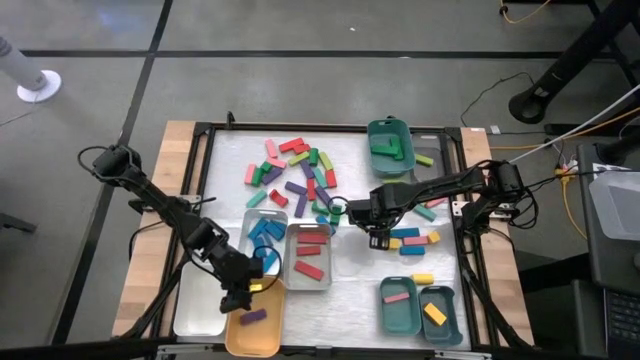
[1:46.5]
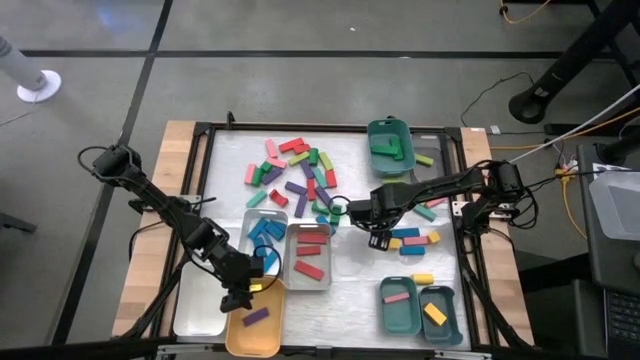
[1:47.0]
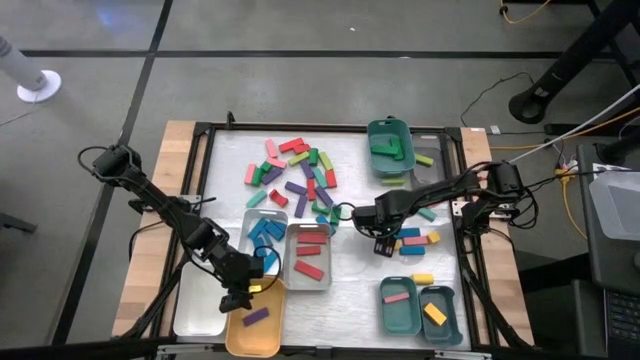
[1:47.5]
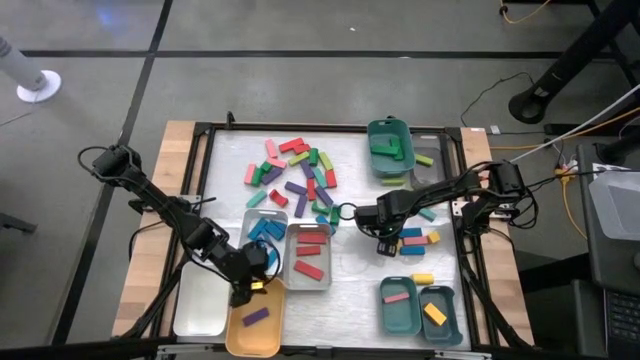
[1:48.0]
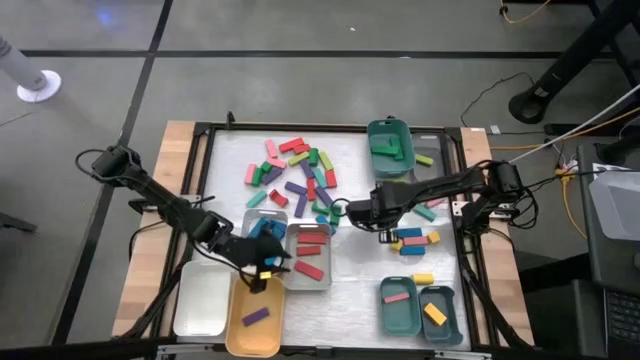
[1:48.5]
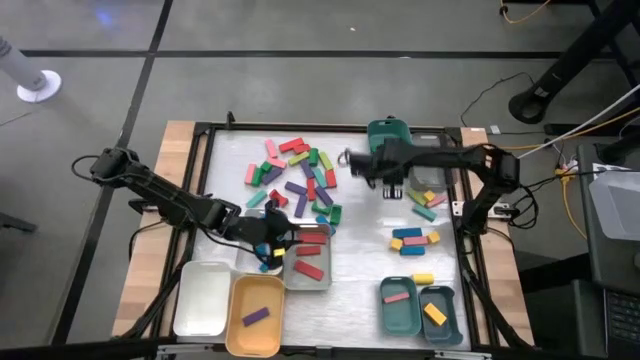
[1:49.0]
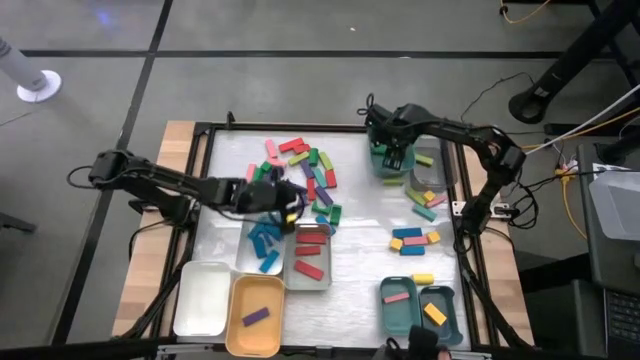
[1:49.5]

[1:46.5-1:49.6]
Task: Sort blocks
Put the green block into the top green bin

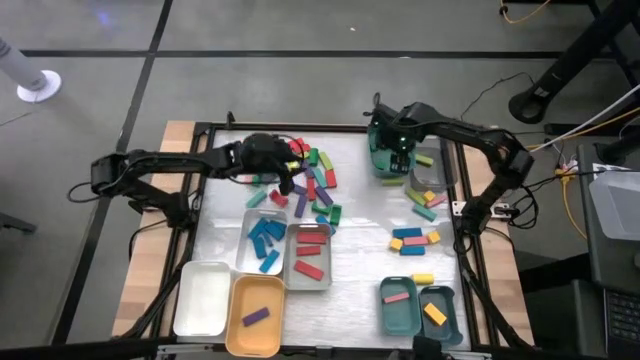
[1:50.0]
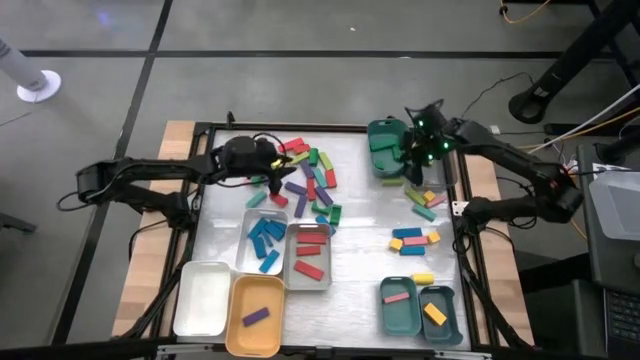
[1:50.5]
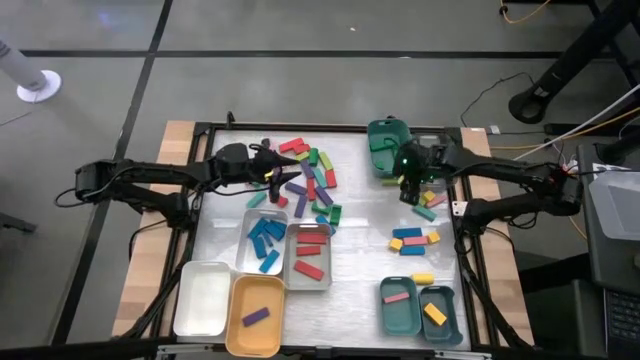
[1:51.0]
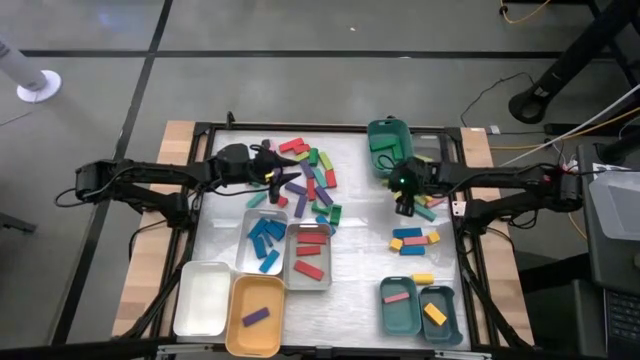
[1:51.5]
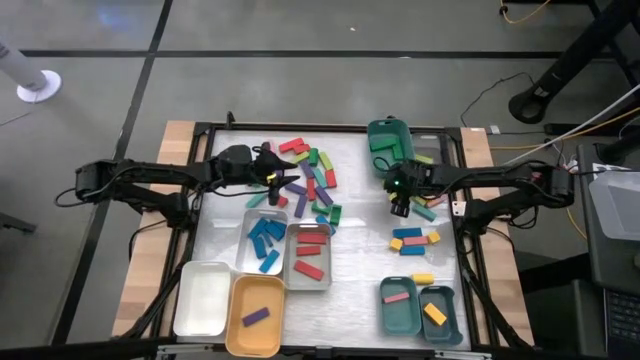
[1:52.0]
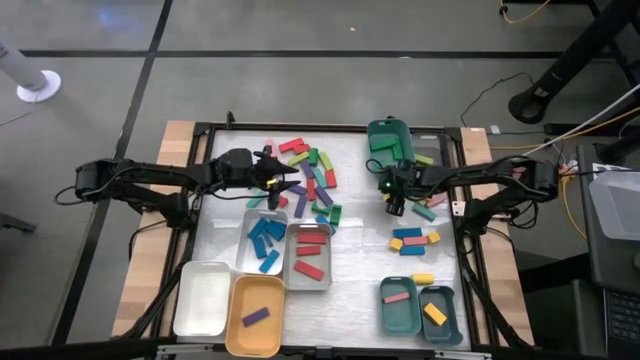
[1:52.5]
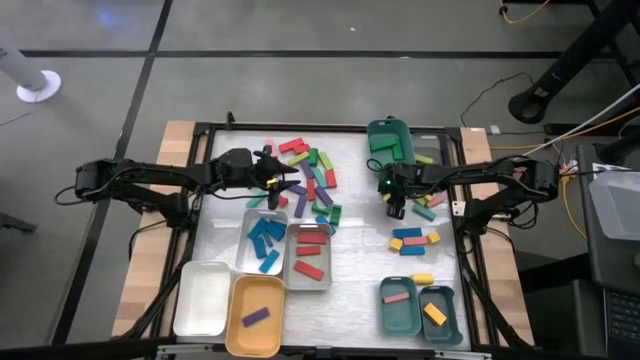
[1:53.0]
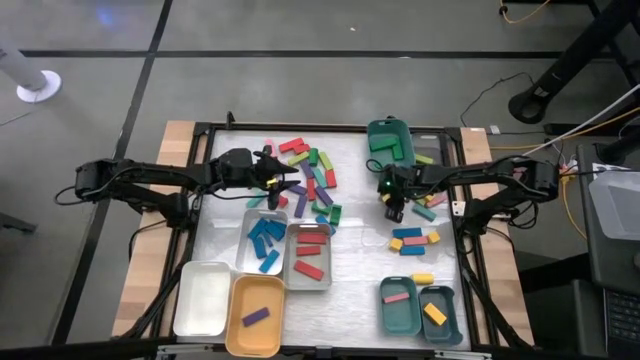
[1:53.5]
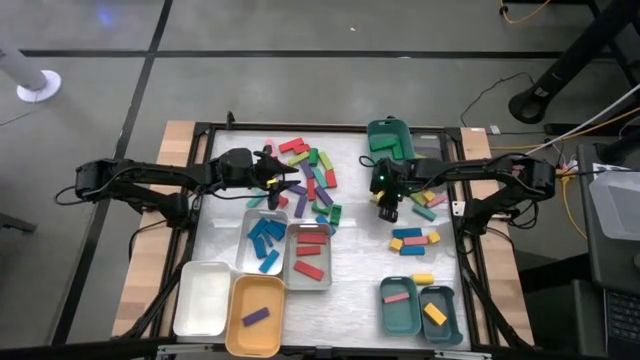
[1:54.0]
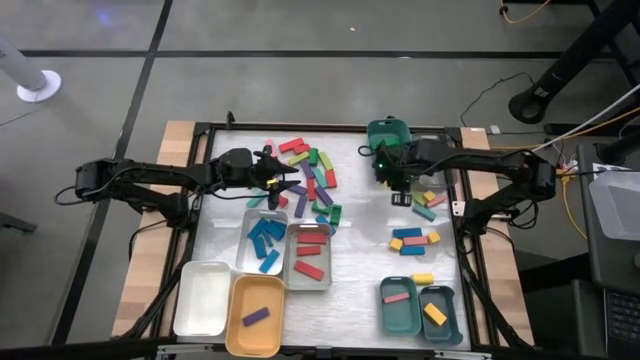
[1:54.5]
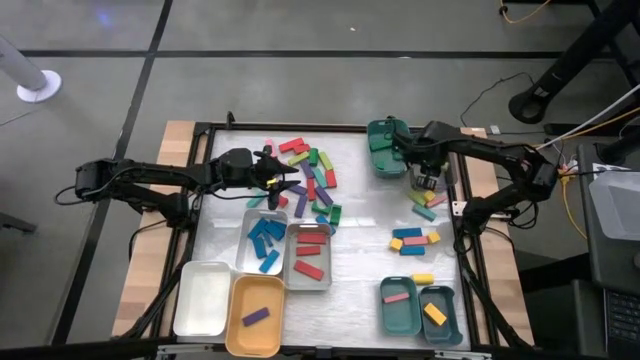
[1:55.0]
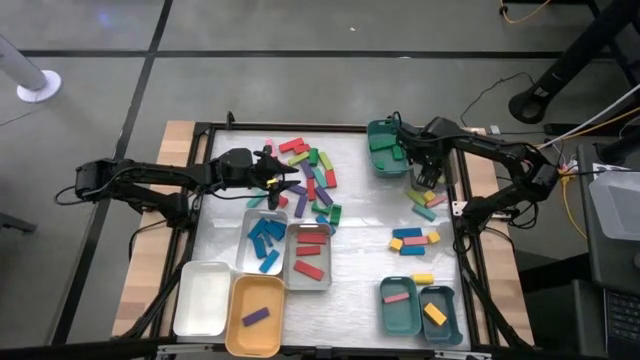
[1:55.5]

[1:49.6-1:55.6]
Put the light green block into the black bin

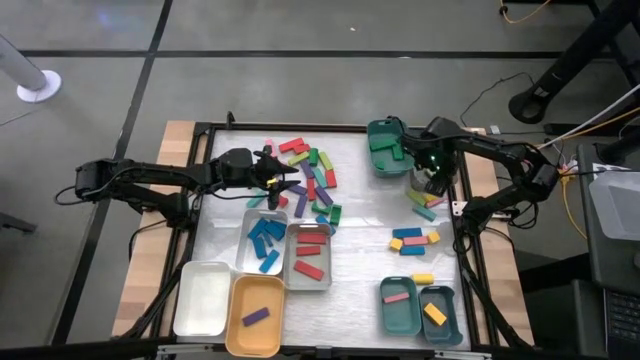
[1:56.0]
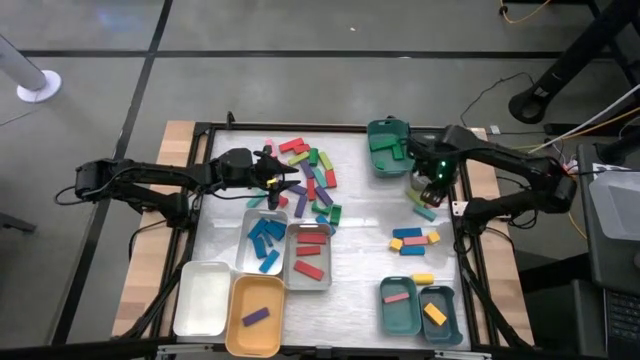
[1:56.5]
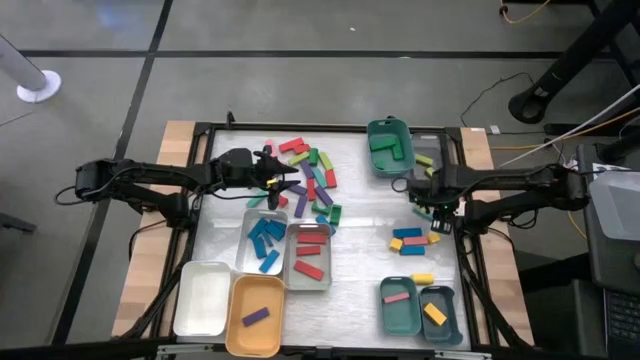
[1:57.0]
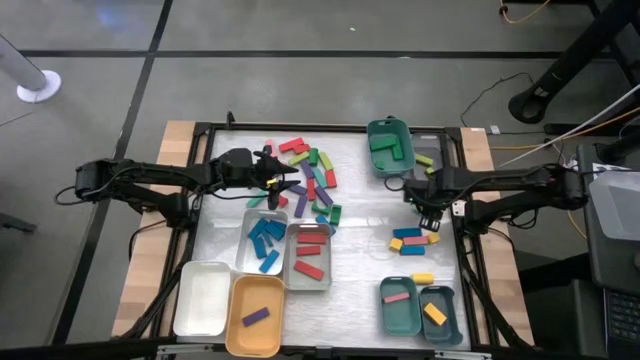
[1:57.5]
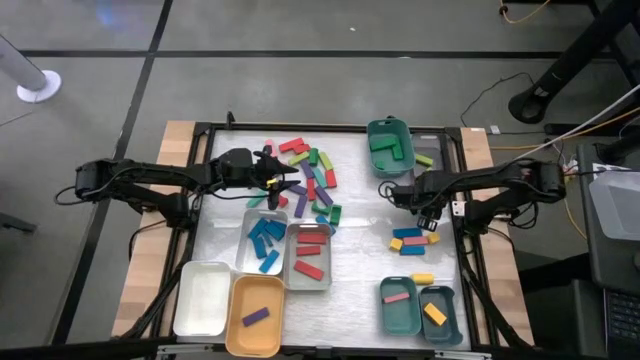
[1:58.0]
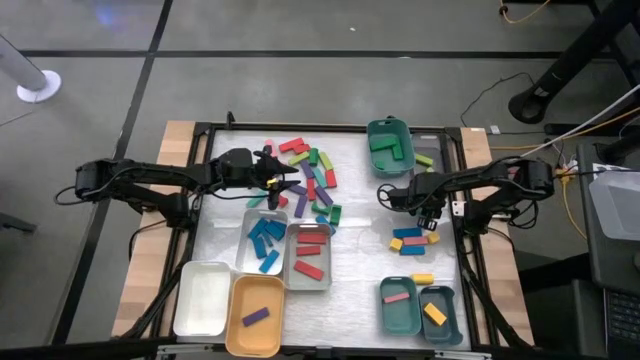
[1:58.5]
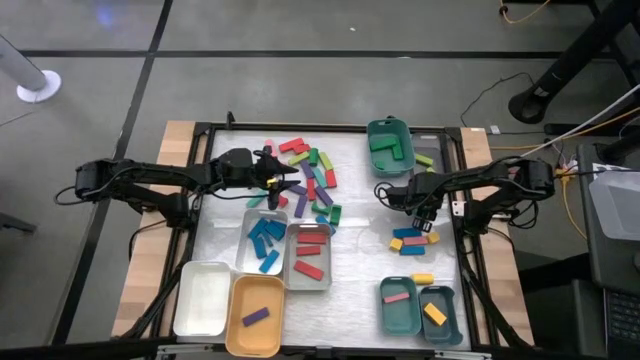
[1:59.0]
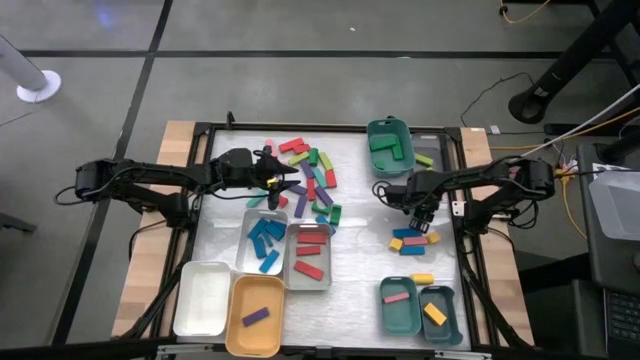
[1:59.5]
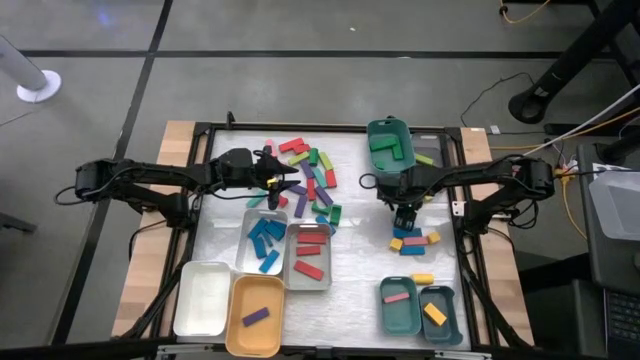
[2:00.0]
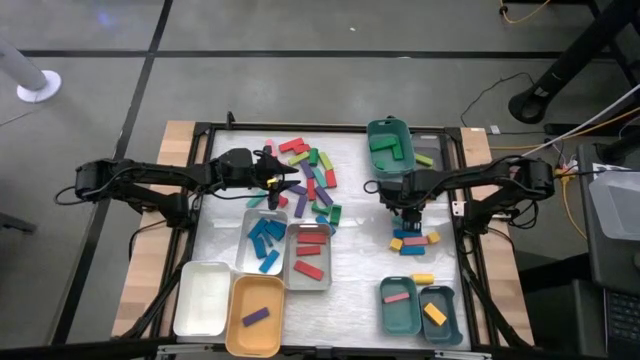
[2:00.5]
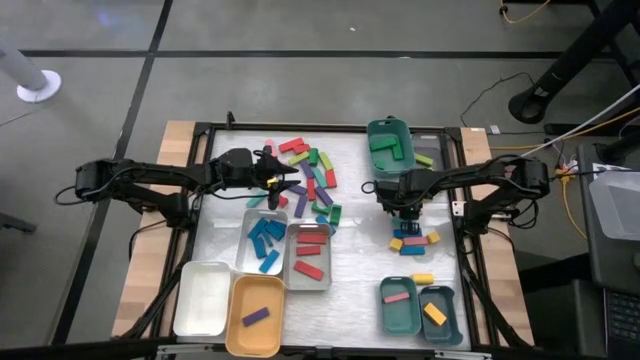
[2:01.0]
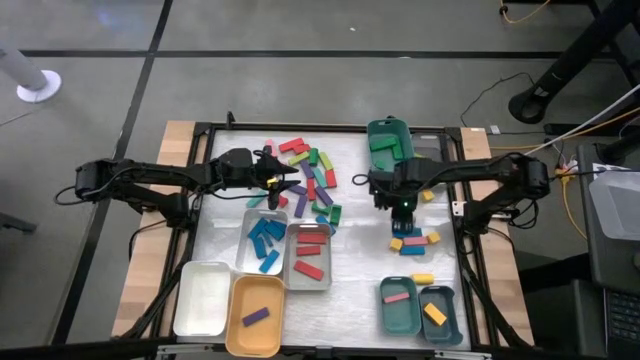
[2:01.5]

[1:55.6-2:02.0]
Put the pink block into the bottom green bin

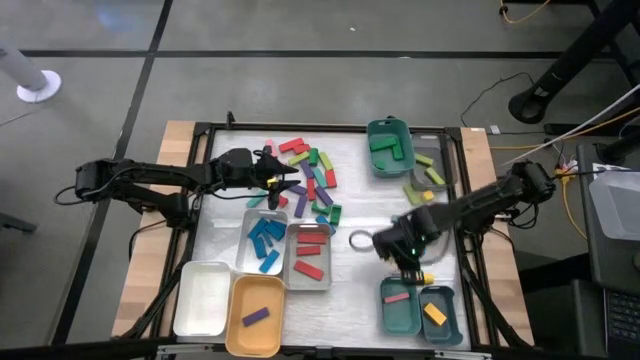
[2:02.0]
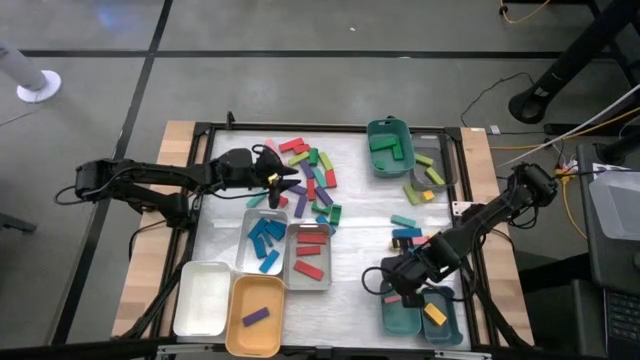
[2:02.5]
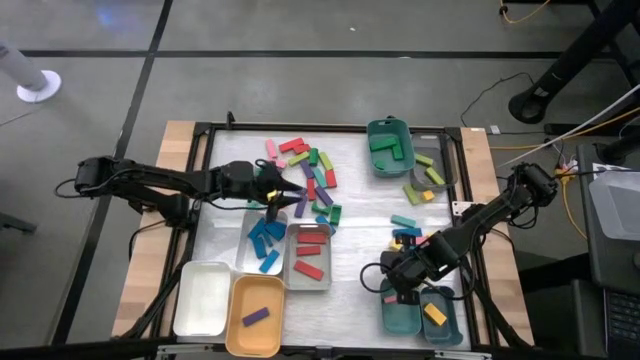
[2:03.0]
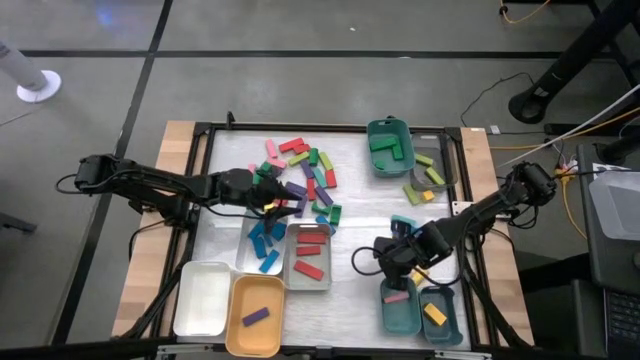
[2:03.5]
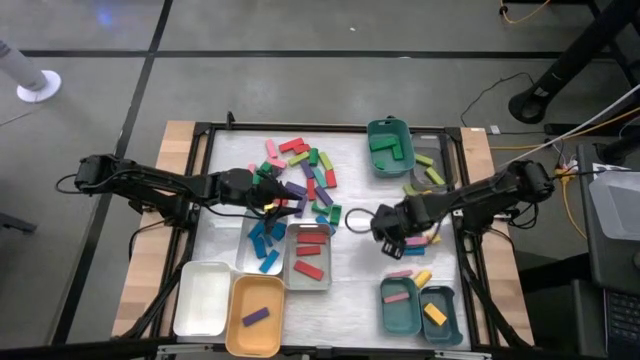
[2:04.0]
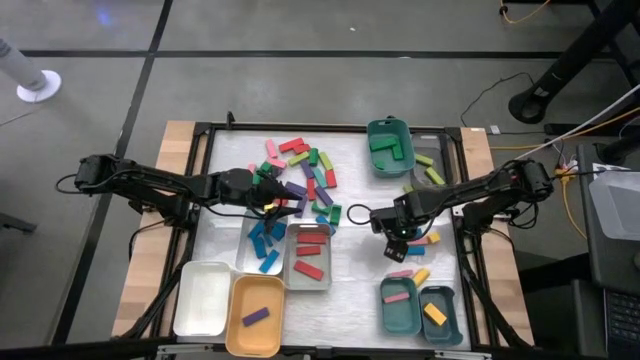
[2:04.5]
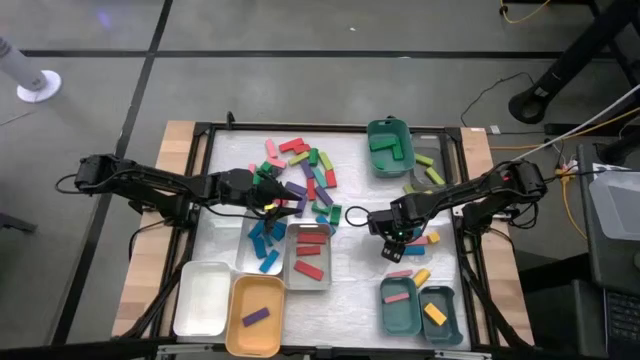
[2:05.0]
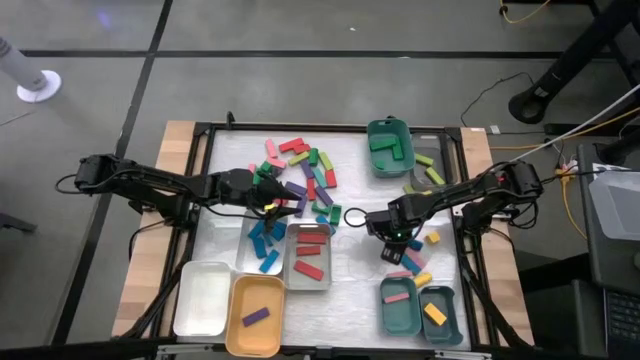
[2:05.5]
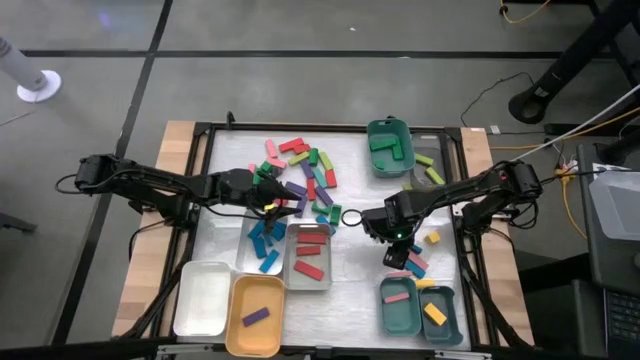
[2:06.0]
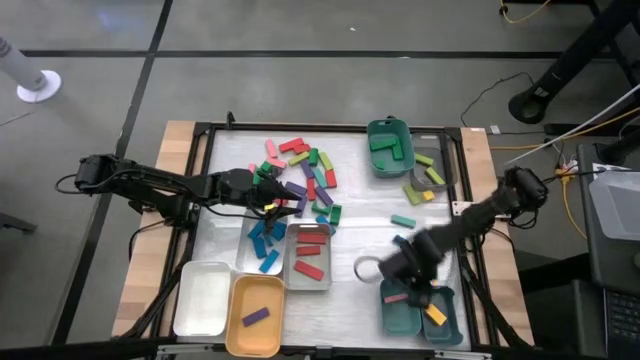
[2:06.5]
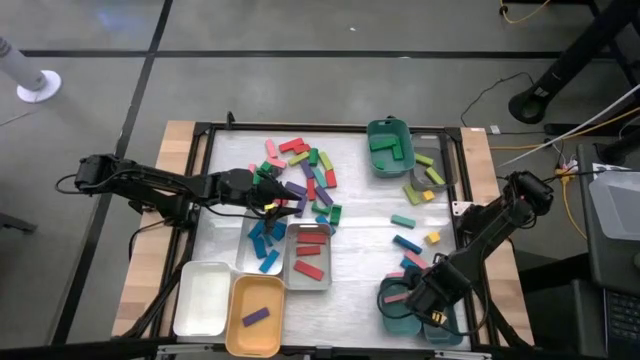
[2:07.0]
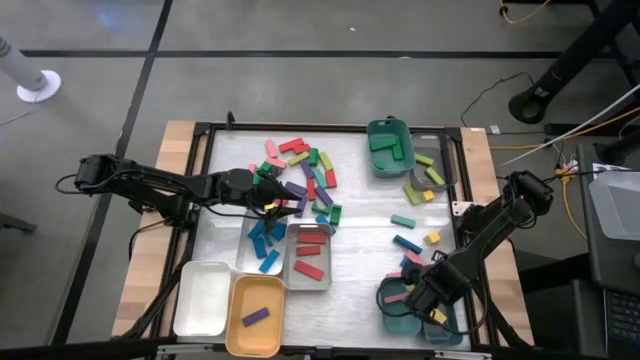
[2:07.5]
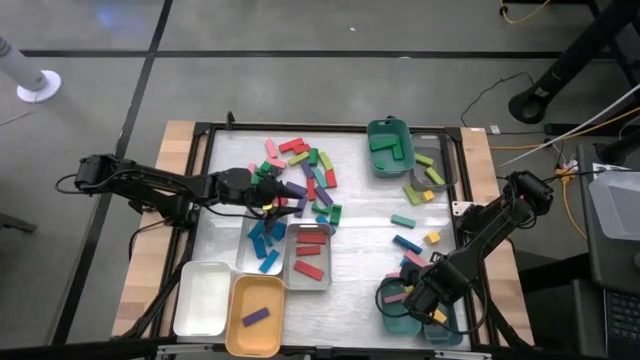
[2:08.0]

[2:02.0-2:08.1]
Put the yellow block into the dark blue bin
